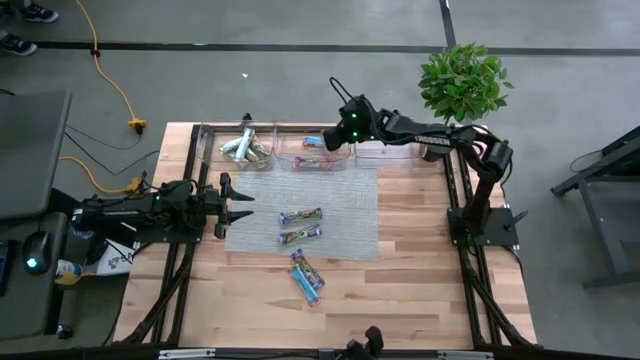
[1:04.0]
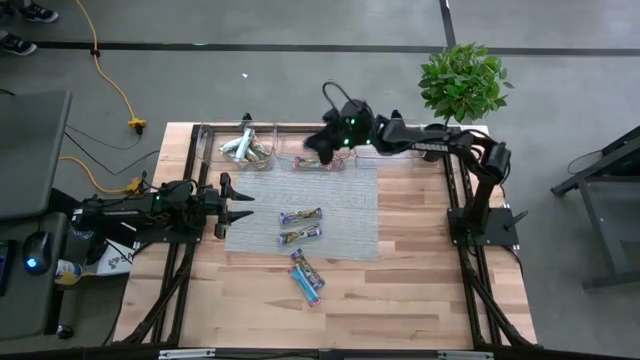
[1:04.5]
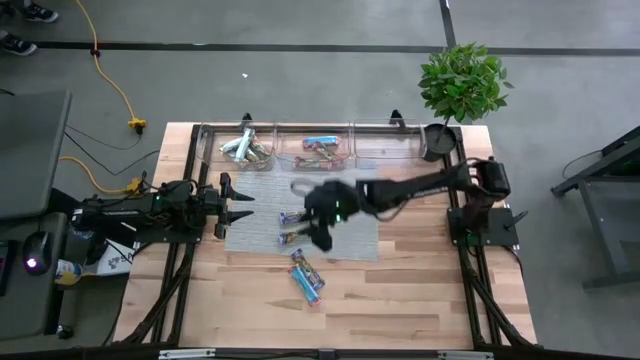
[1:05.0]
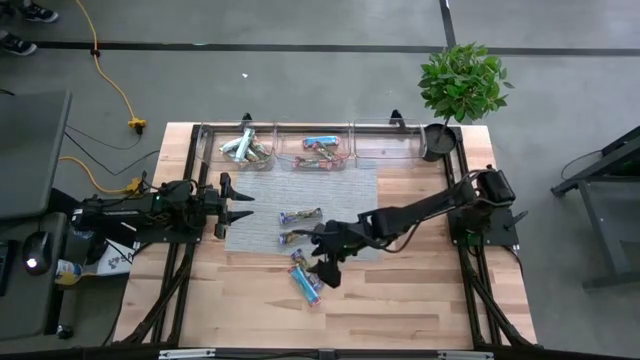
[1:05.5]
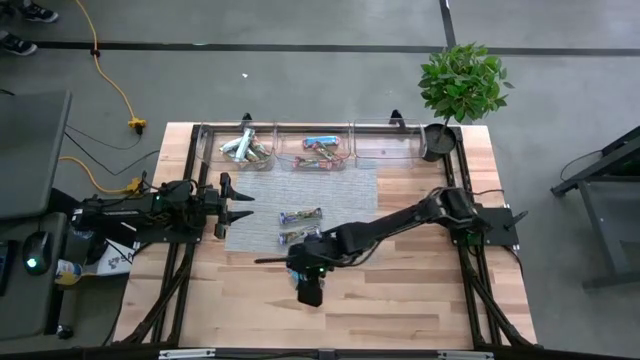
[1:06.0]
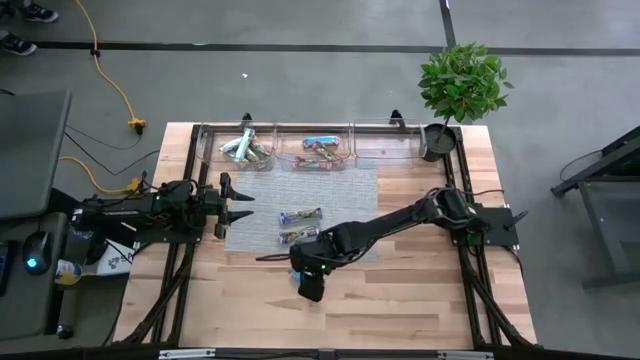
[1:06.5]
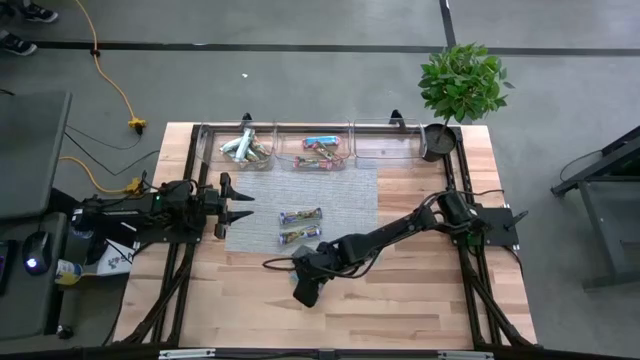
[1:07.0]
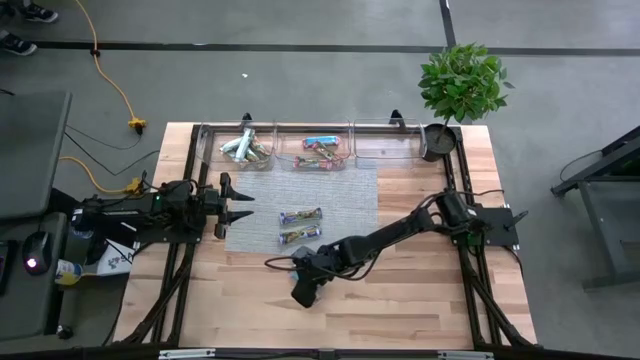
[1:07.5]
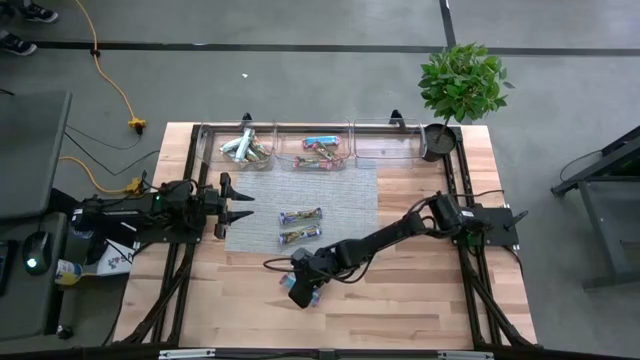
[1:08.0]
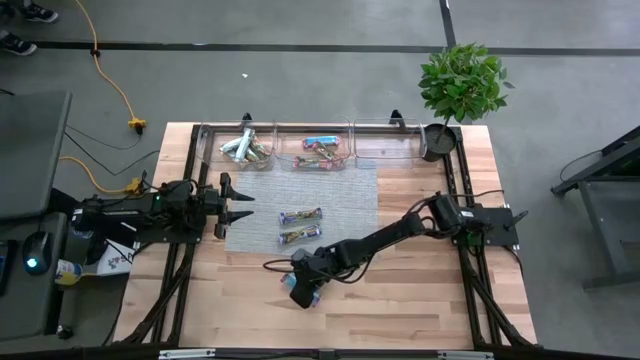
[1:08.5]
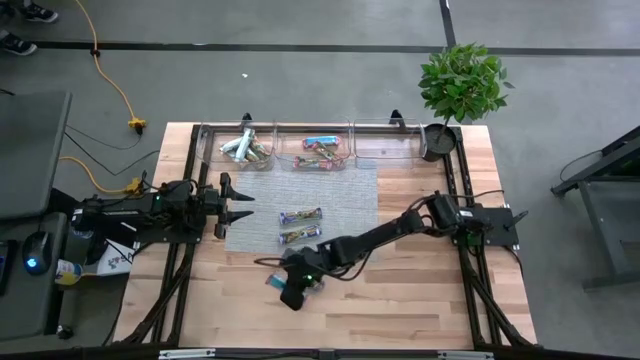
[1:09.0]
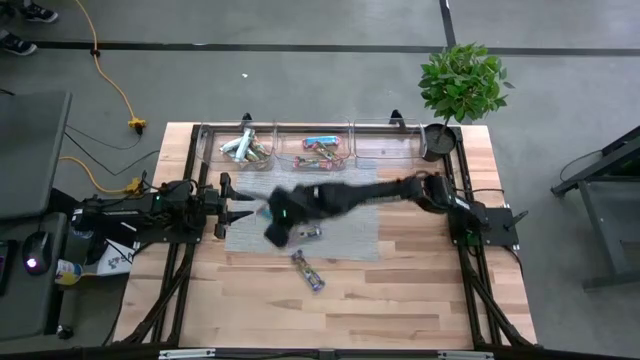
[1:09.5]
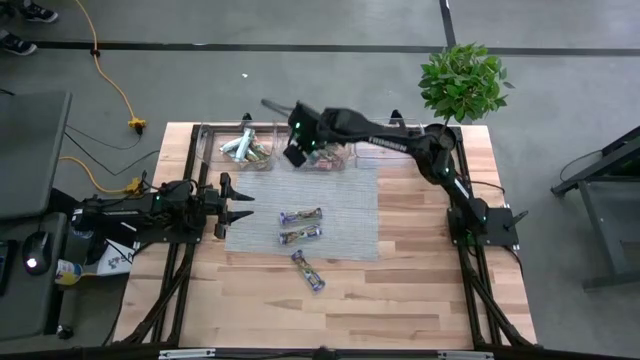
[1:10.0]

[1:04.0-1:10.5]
Task: Pick and place Granola Bars by type
Put the red granola bar into the middle transparent bin

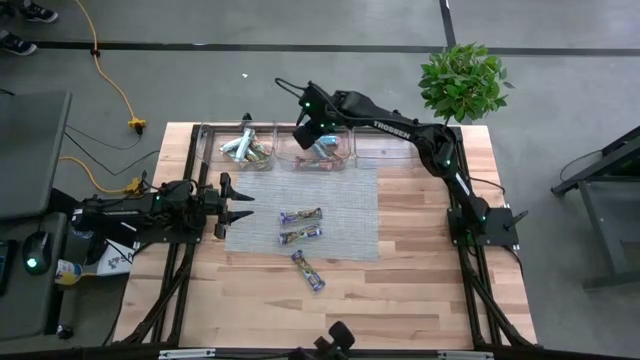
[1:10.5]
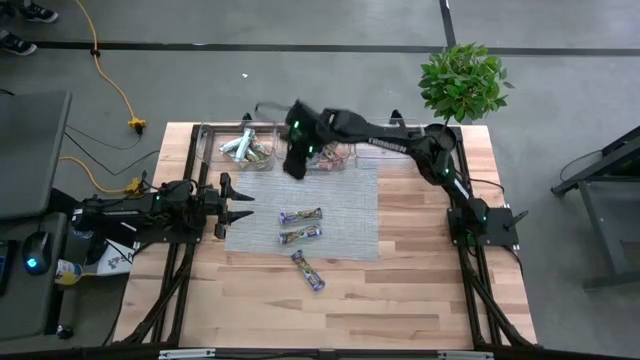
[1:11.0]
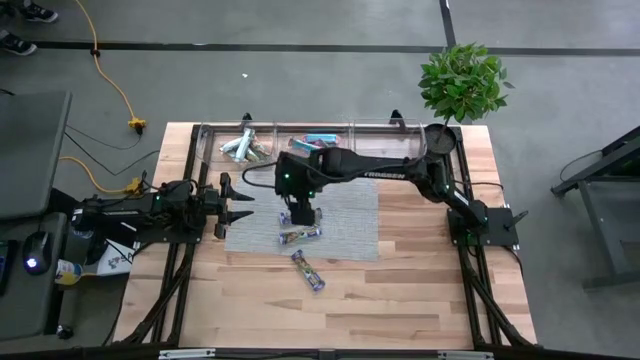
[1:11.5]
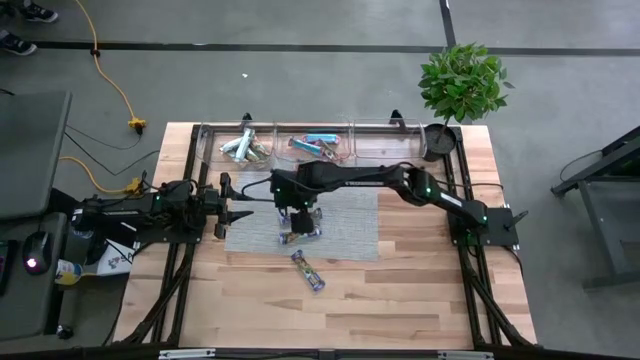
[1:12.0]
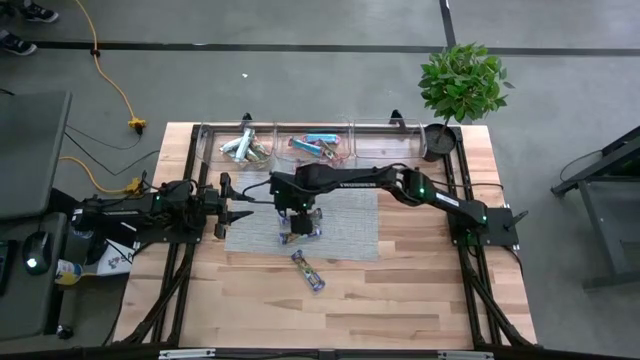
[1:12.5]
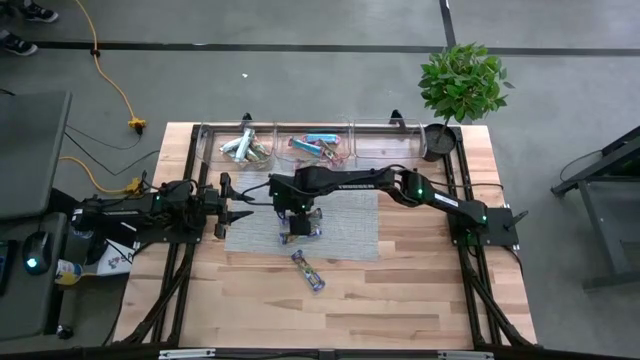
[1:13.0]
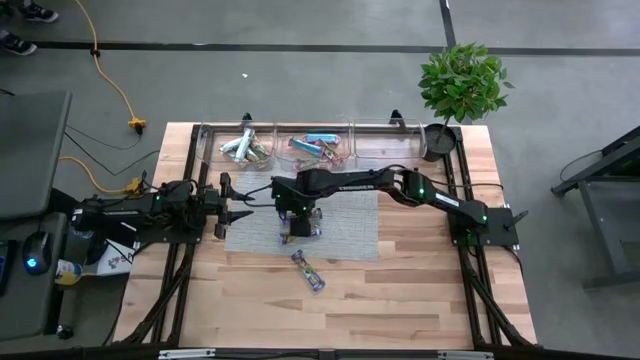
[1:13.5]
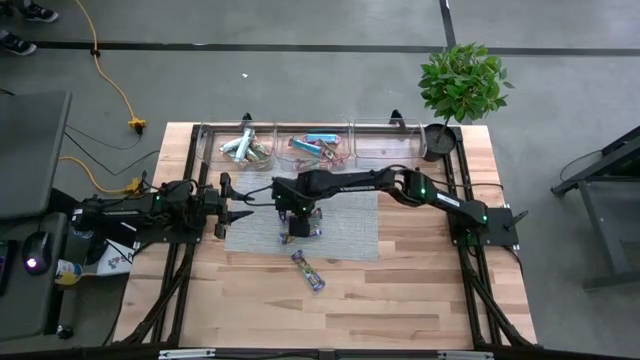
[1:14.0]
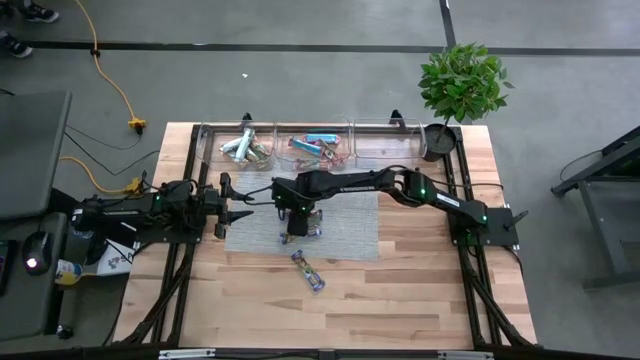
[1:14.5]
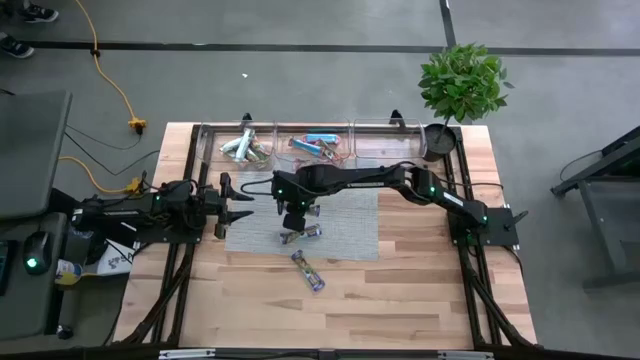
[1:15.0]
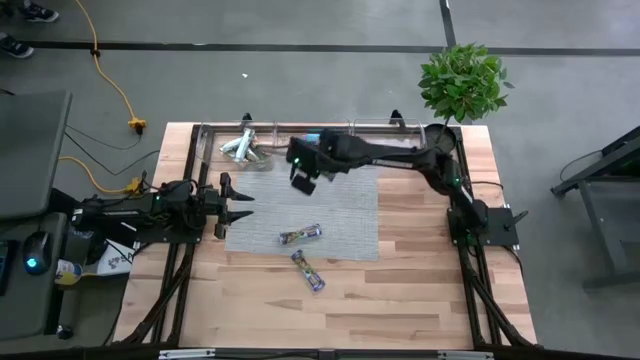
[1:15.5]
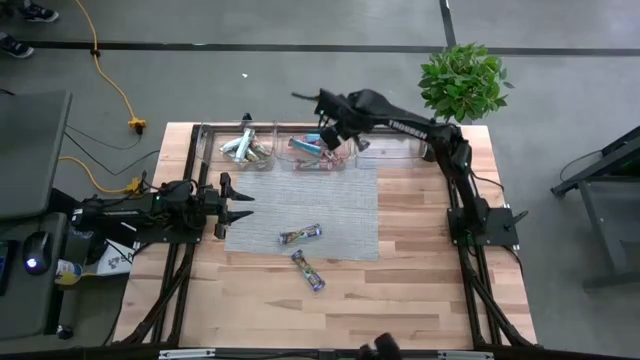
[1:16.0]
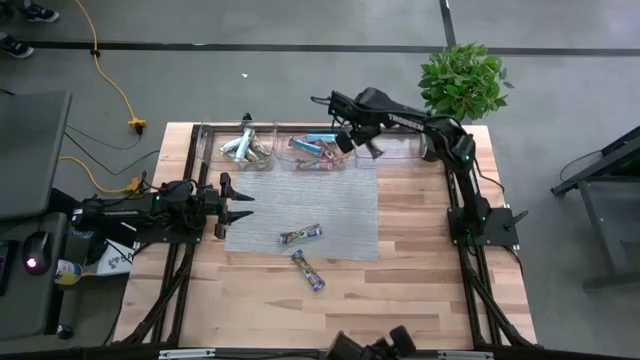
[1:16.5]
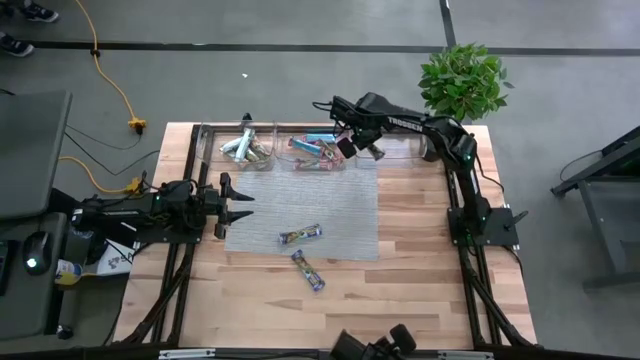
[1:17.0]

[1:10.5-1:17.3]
Put the blue granola bar into the right transparent bin

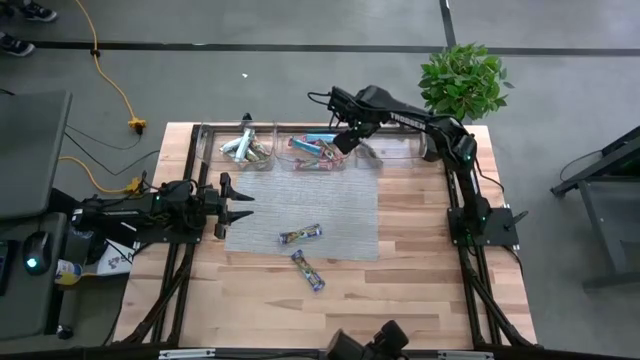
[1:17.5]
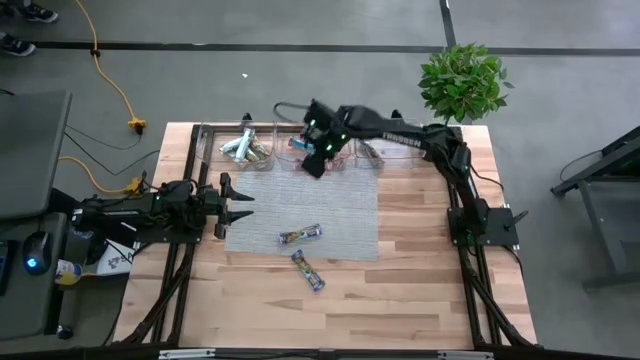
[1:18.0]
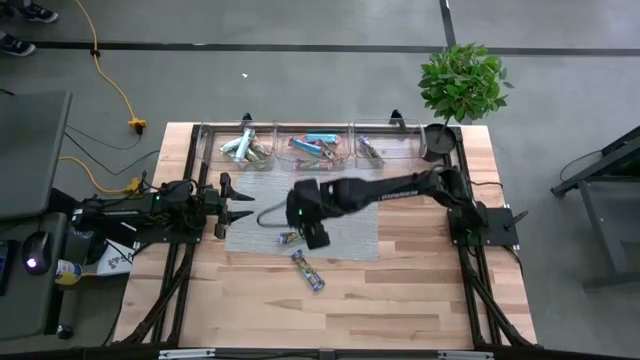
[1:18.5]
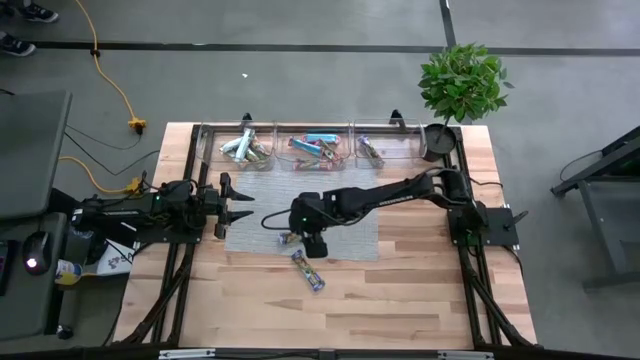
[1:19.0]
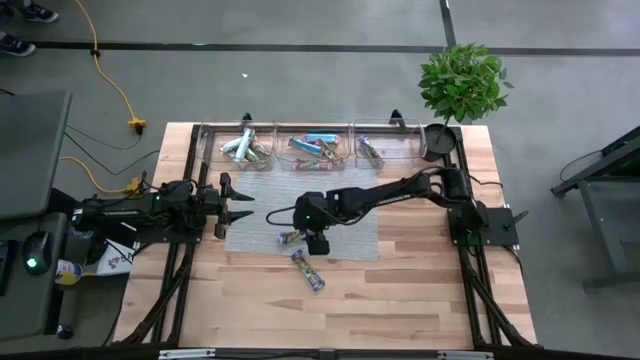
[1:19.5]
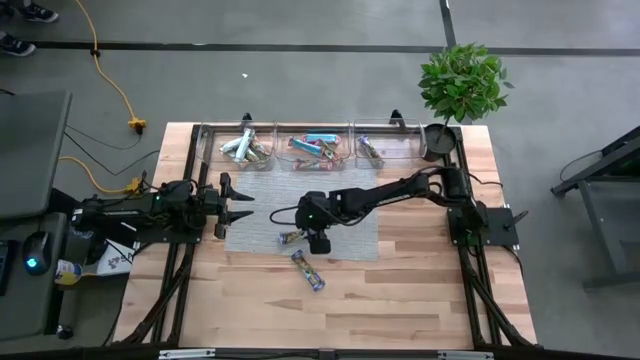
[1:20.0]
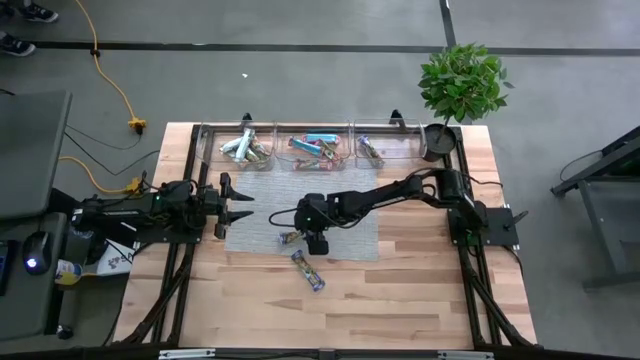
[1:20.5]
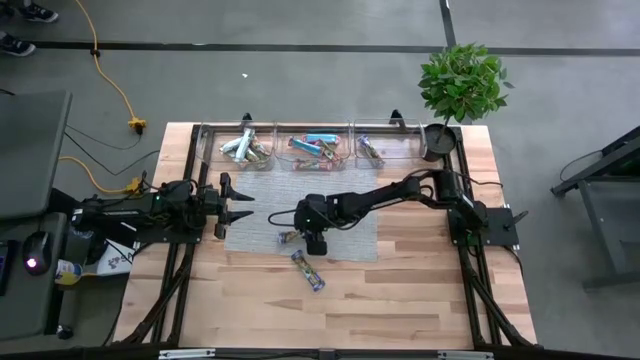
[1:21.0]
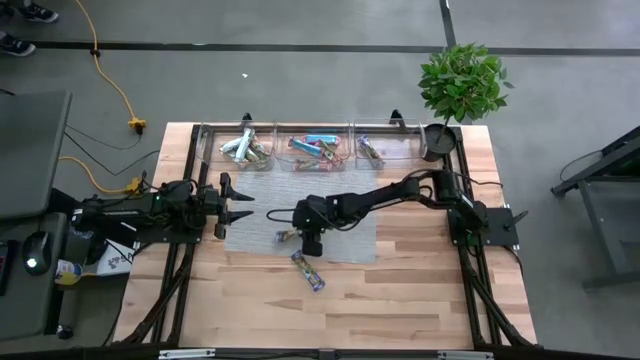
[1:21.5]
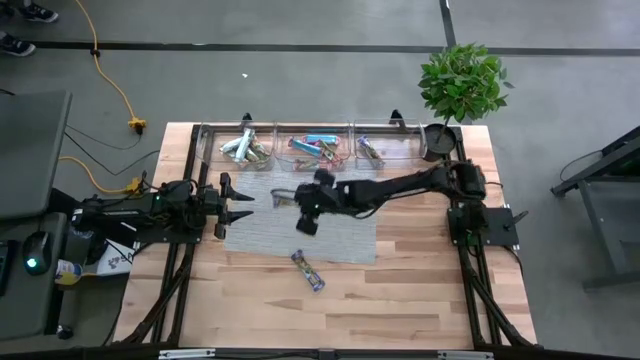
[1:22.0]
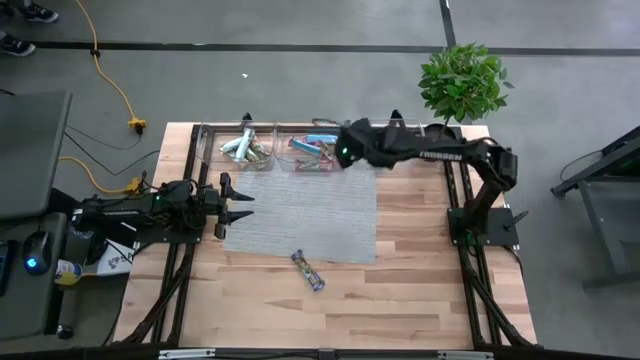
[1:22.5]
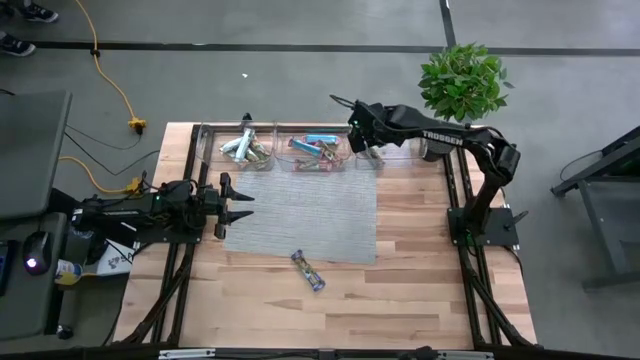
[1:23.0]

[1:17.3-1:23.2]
Put the blue granola bar into the right transparent bin

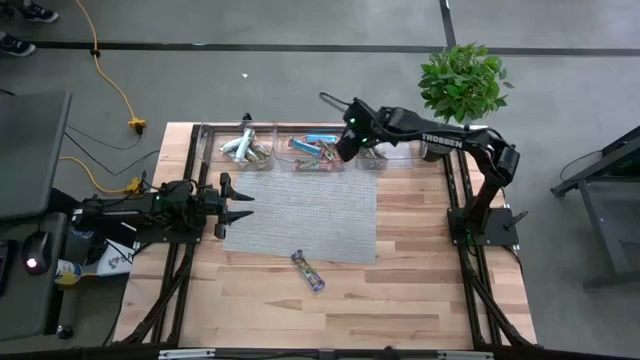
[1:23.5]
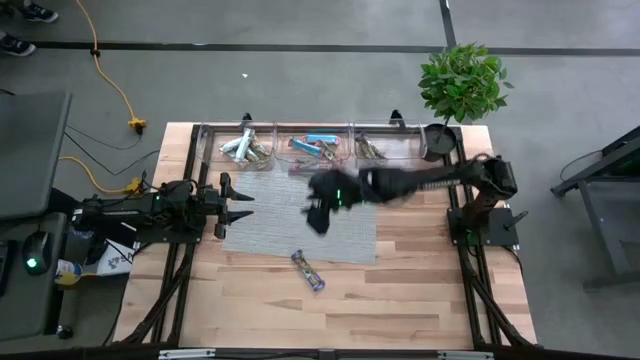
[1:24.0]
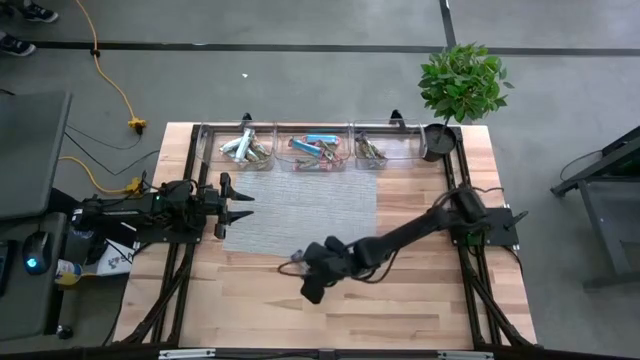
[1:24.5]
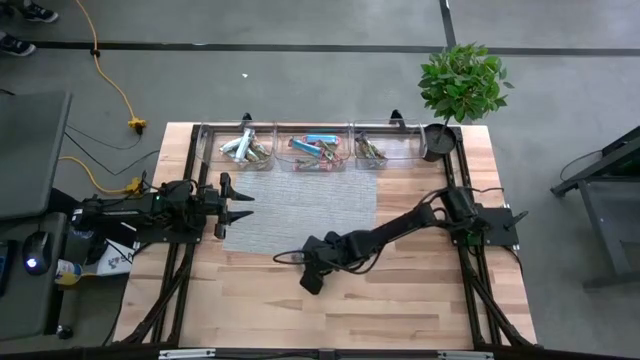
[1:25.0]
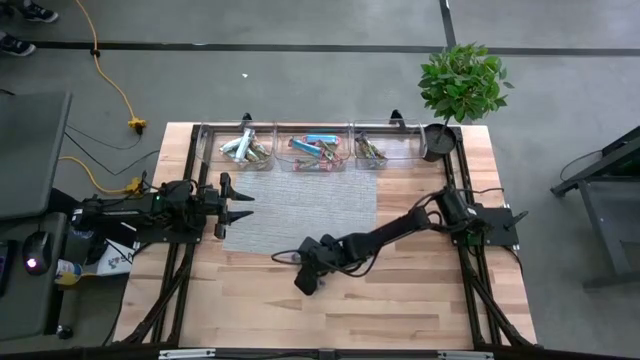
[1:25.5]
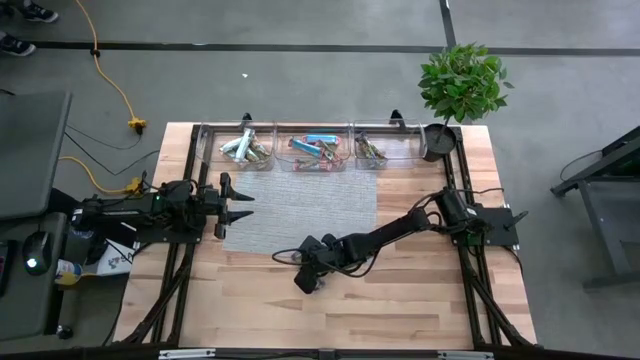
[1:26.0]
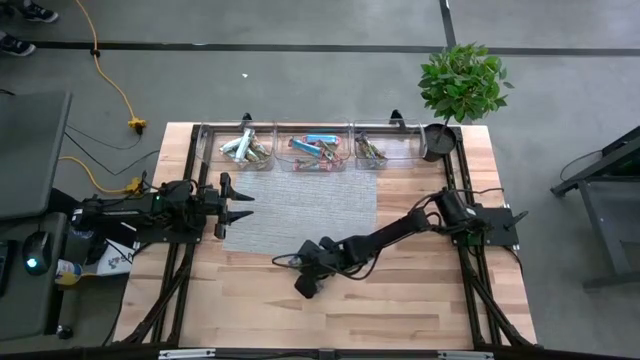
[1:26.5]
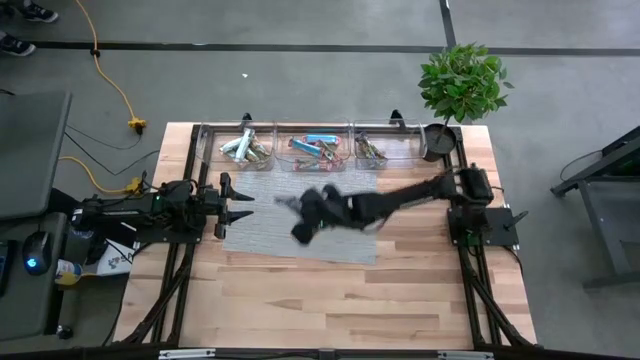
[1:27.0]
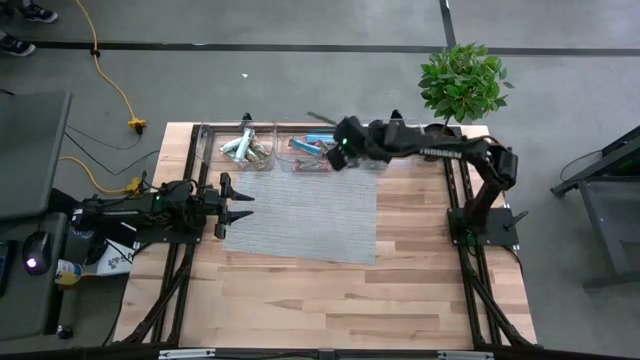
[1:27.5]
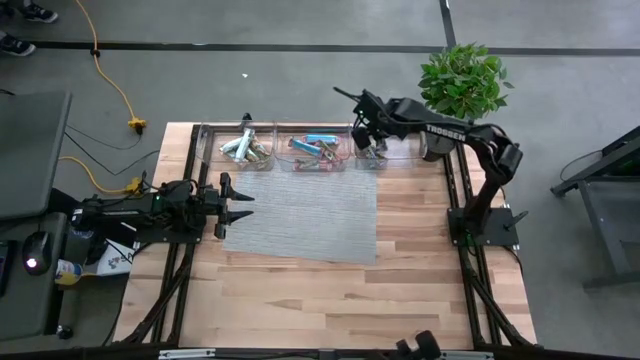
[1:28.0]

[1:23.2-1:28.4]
Put the blue granola bar into the right transparent bin
